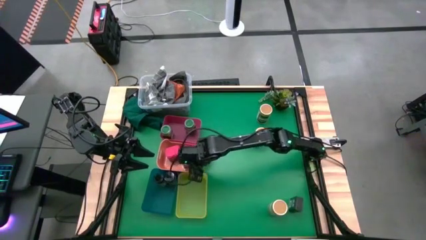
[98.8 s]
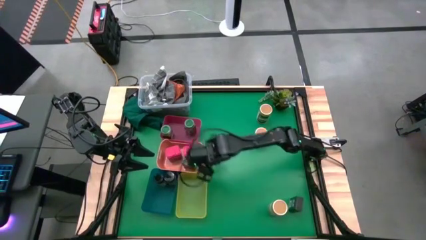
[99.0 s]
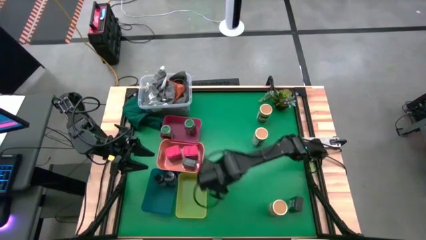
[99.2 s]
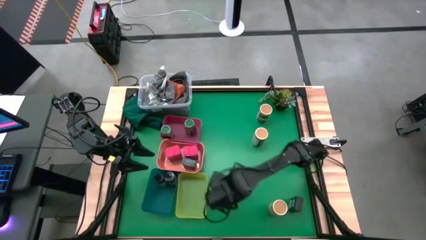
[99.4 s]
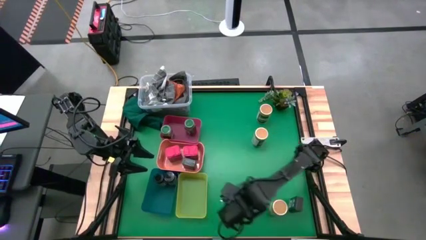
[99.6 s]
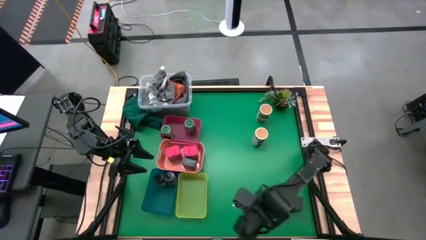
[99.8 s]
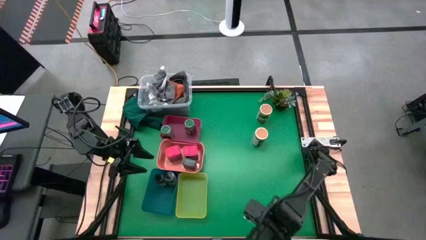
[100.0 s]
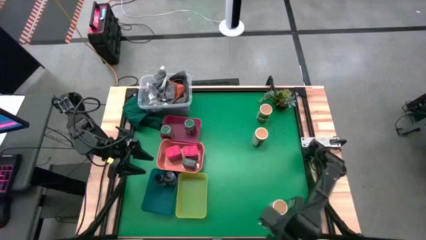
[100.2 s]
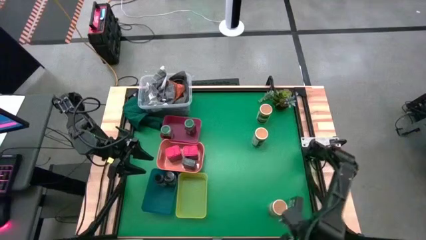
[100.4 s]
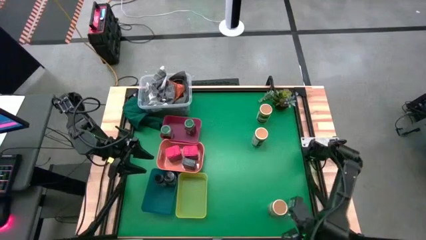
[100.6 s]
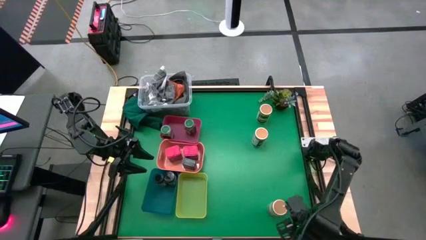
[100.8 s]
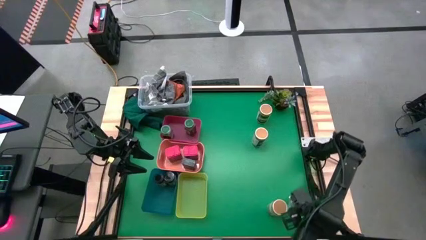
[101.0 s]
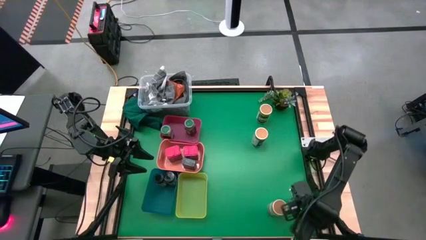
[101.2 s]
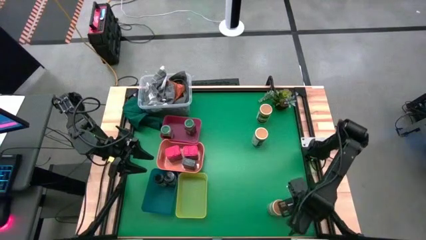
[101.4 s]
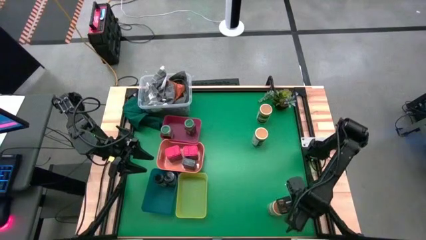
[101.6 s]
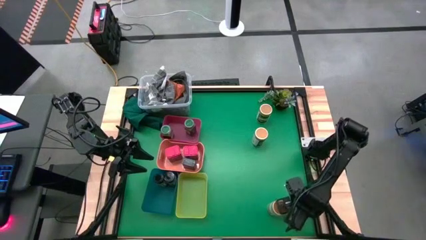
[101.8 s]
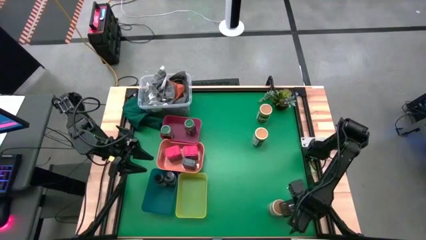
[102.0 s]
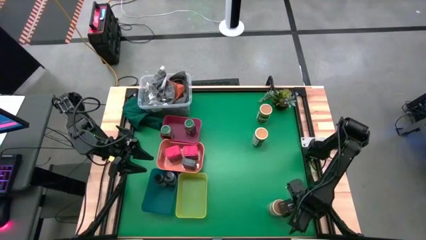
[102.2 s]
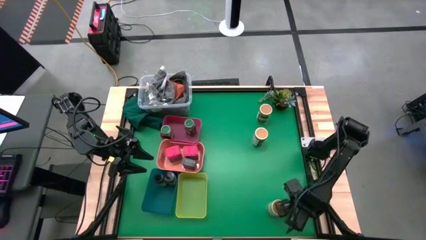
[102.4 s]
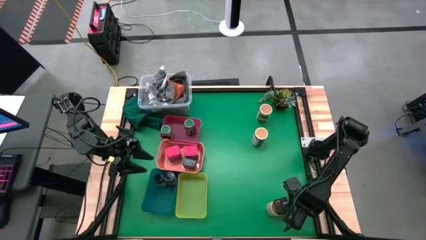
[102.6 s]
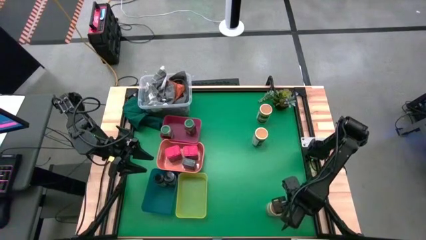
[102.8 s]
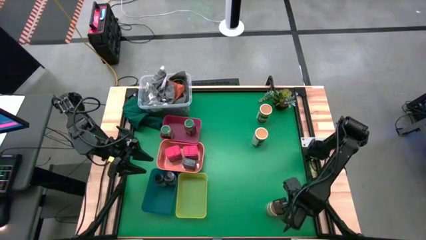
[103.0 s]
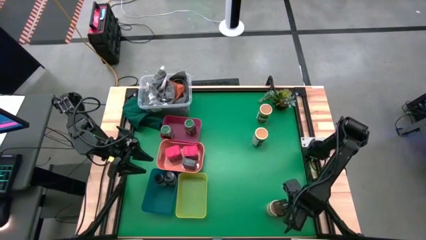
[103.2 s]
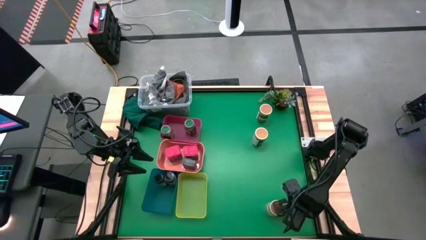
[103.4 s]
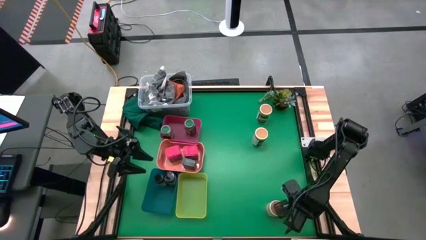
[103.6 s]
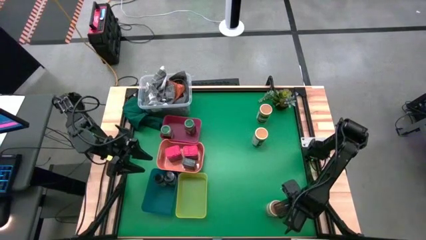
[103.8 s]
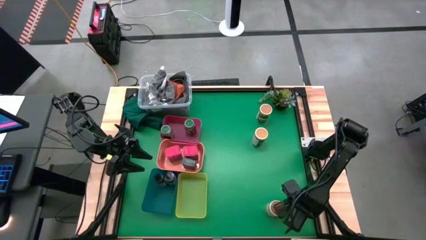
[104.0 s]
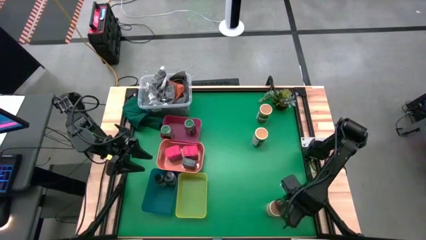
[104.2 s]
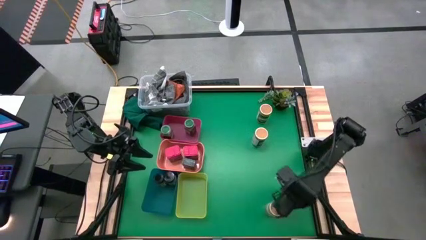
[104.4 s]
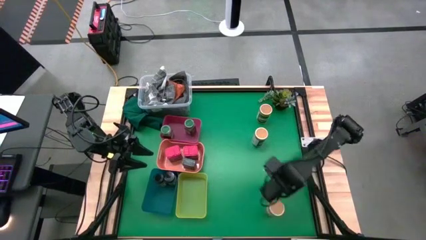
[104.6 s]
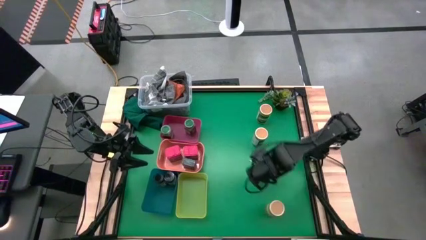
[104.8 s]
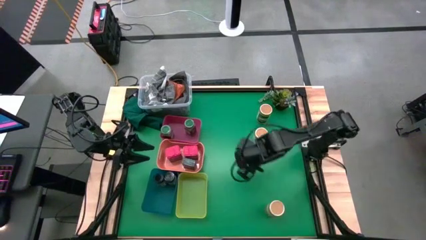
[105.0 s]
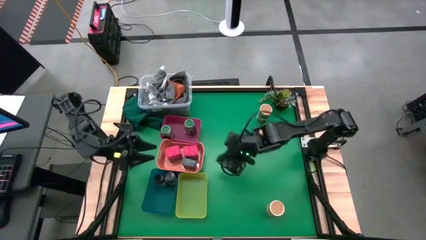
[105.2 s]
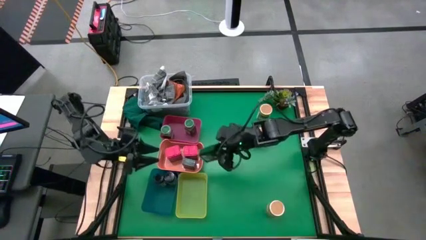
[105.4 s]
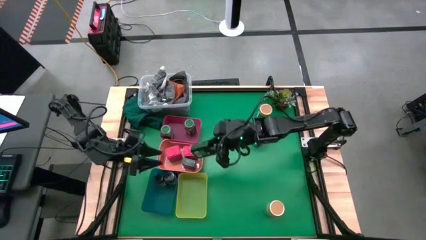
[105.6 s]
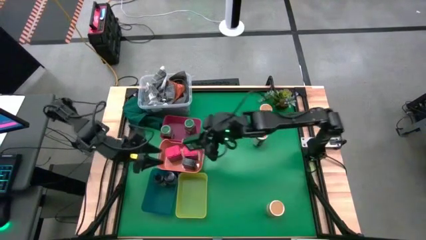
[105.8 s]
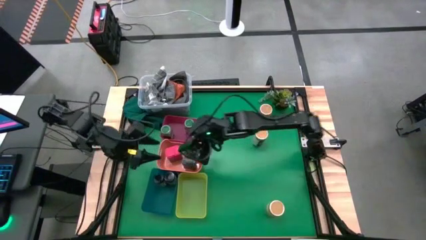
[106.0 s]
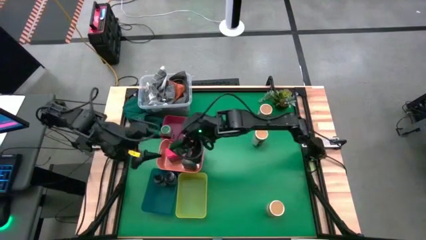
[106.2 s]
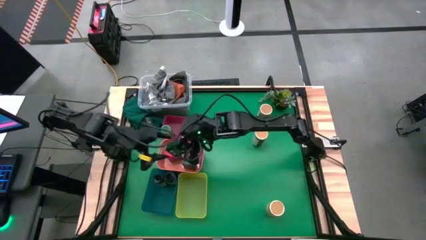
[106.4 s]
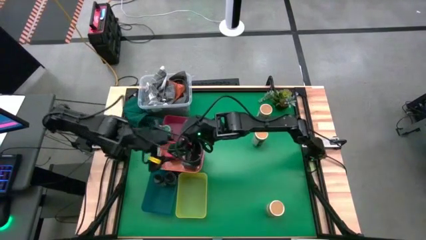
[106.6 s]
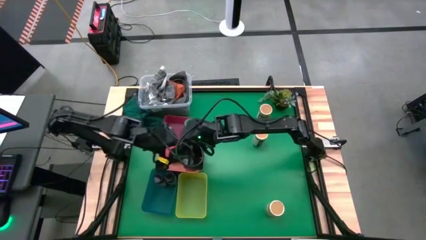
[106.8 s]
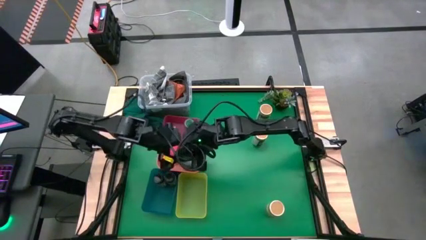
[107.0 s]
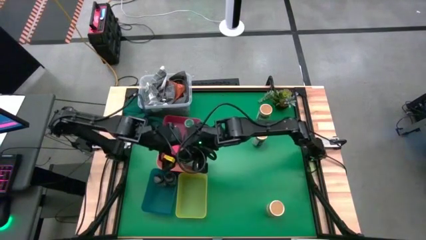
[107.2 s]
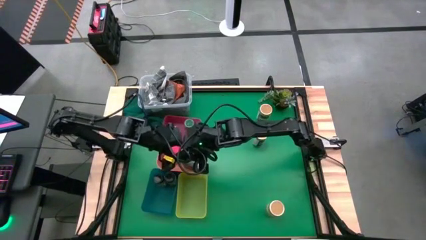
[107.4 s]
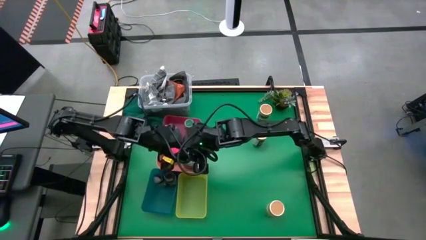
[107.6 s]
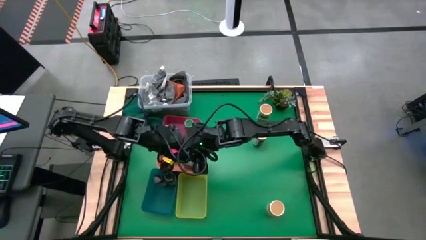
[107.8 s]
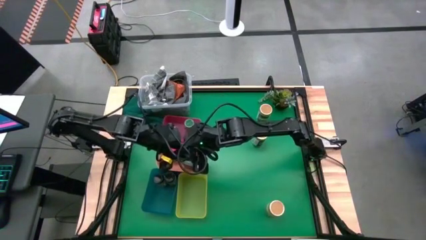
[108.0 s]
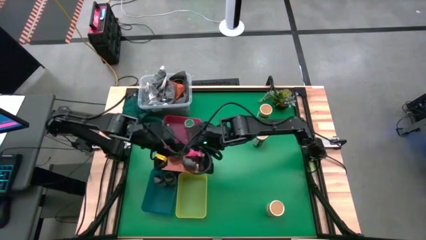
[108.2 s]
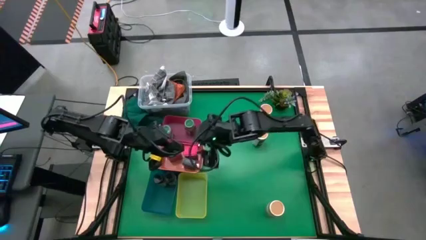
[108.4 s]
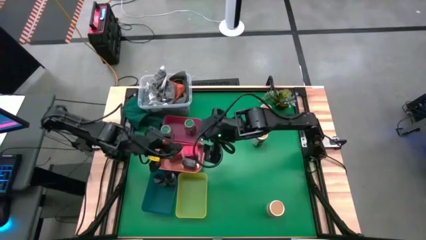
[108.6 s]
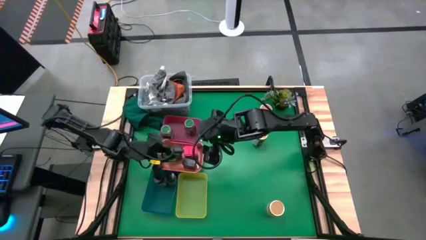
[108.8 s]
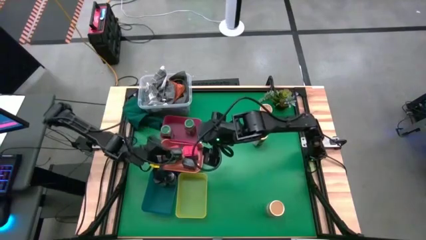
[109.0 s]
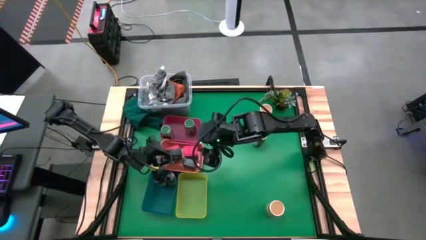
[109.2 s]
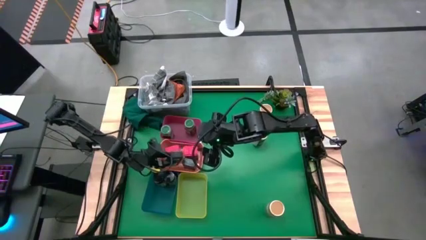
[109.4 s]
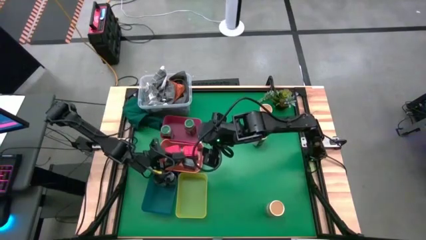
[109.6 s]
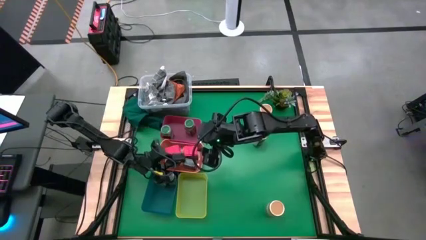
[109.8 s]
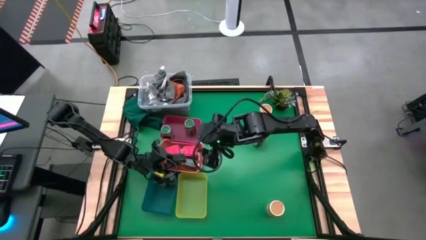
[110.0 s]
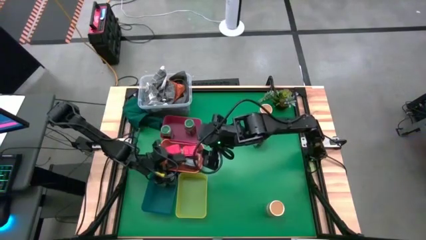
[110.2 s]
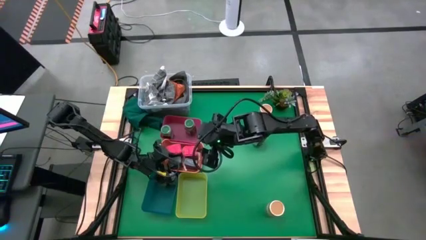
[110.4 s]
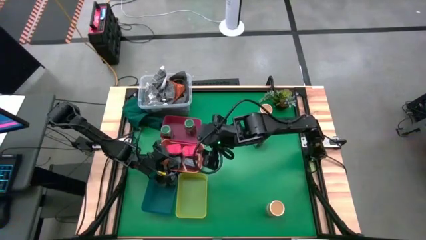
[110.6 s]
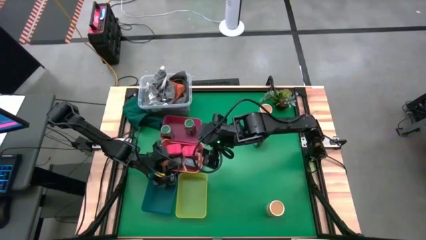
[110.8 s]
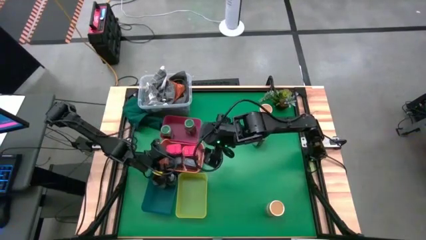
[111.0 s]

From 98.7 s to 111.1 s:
Task: Sort spices by type
Put the black seasoning can into the orange bin

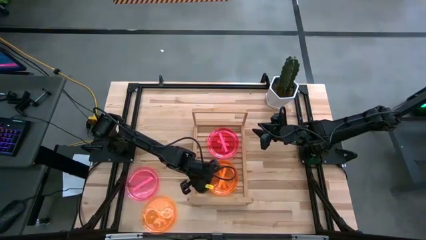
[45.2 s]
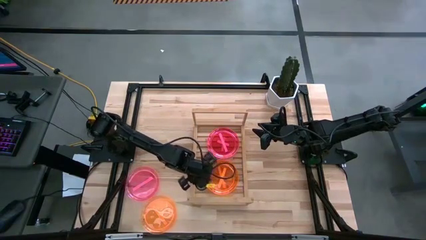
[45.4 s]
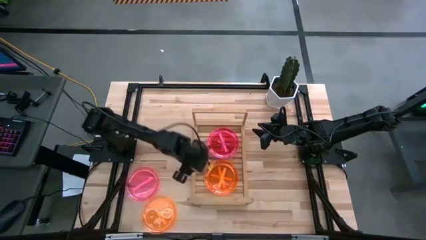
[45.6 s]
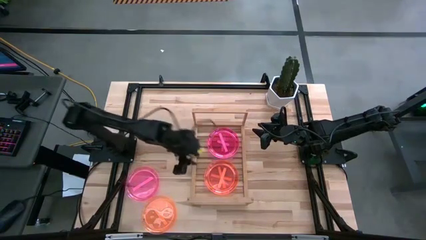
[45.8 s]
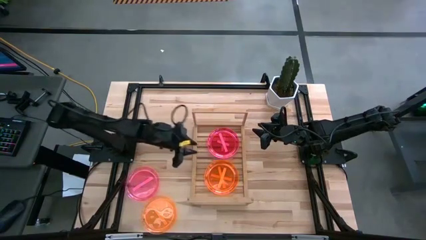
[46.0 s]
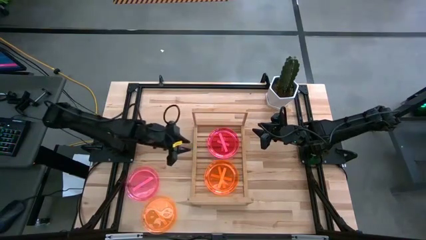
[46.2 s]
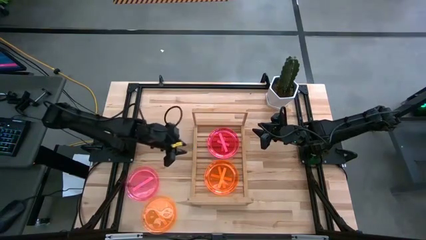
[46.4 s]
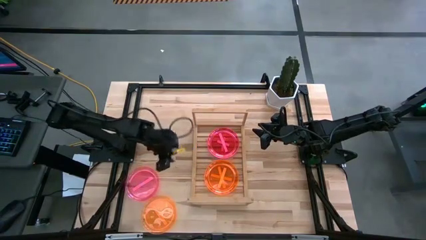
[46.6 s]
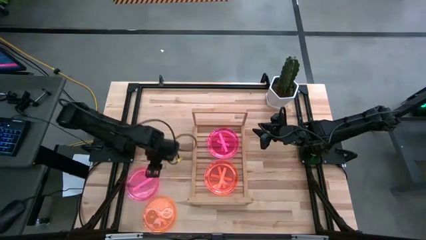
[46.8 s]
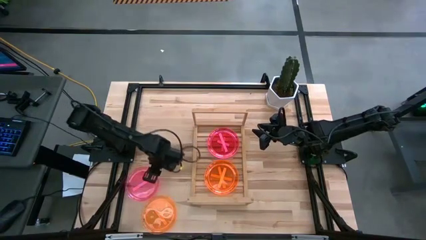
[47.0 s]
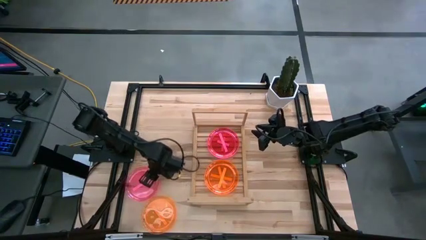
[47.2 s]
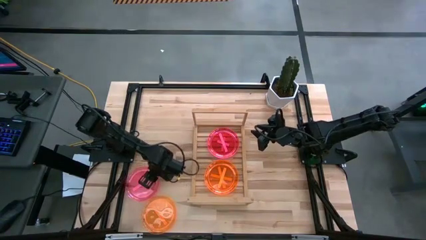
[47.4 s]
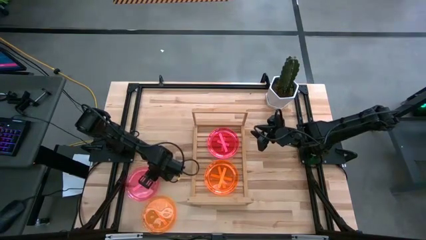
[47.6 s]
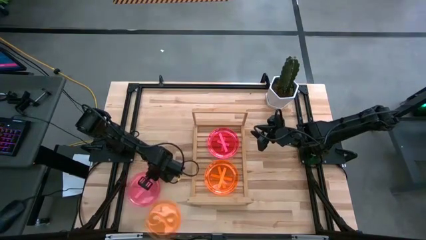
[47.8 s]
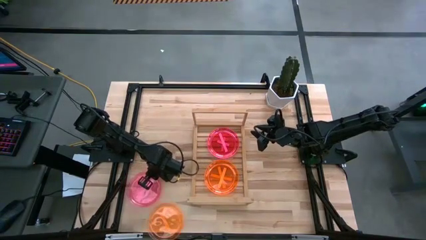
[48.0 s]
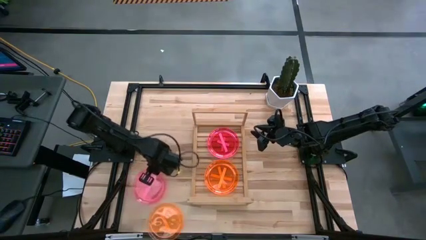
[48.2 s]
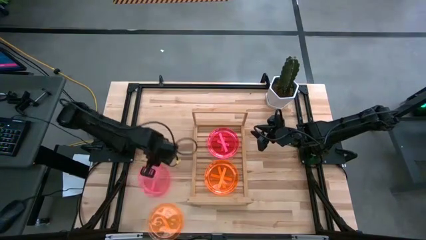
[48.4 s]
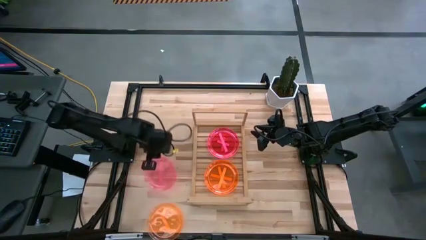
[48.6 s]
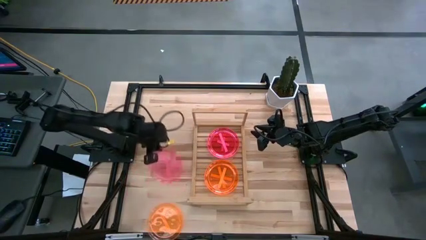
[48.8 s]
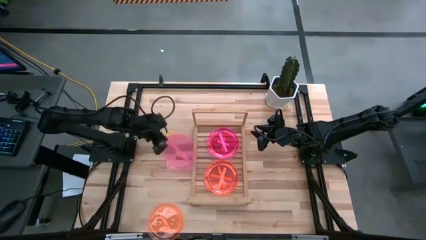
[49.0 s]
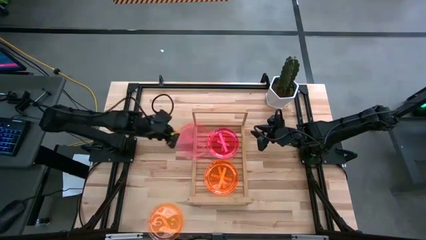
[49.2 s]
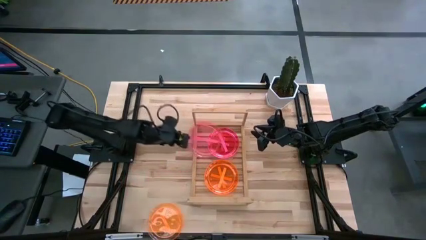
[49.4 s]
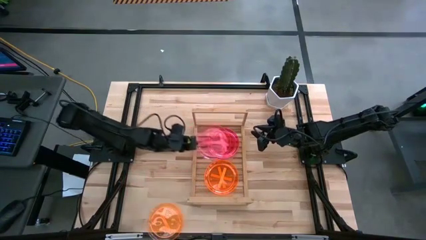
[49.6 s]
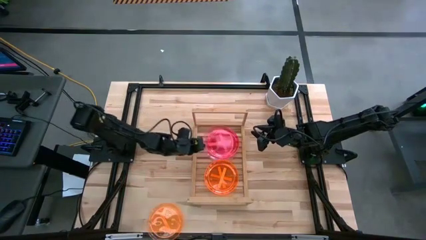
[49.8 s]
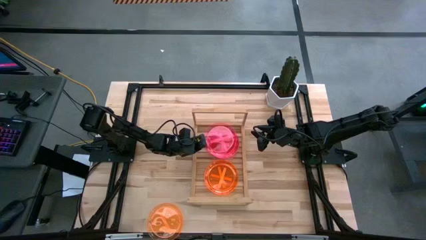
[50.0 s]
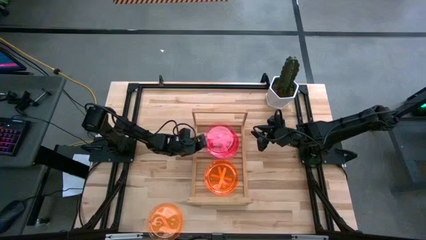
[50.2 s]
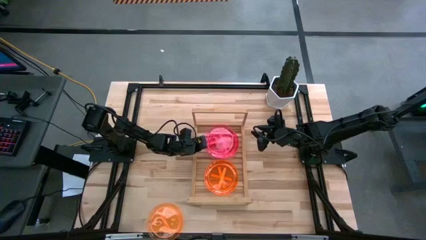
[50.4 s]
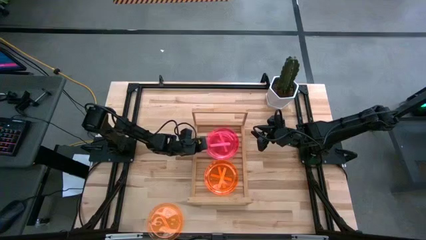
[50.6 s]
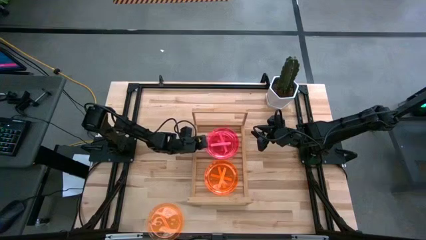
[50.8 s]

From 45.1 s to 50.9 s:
Task: Place and stack plates onto a shelf
Stack the pink plate on top of the pink plate on the shelf
